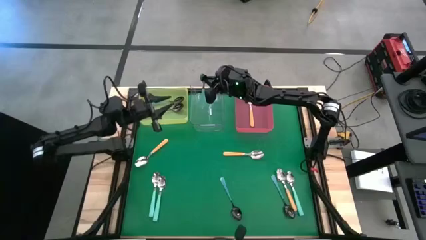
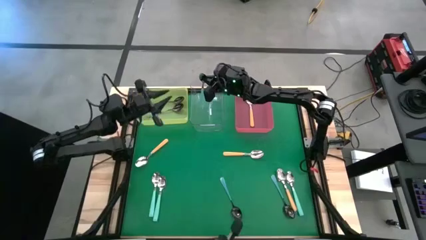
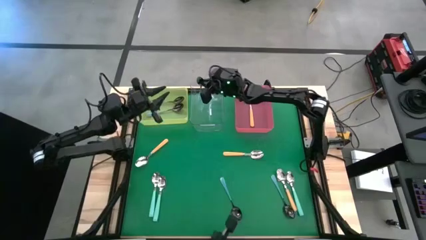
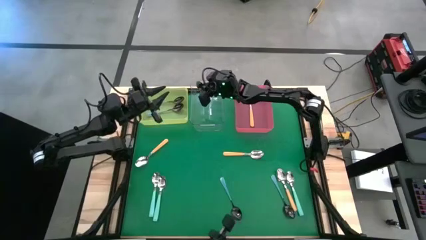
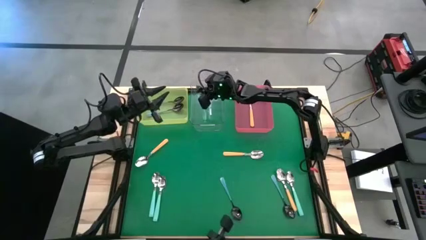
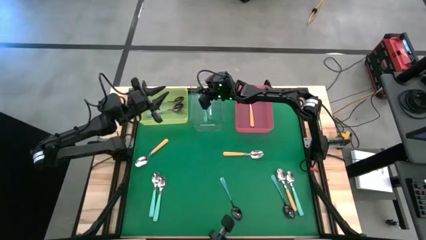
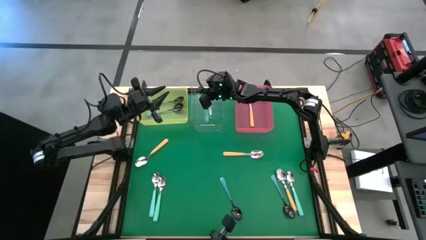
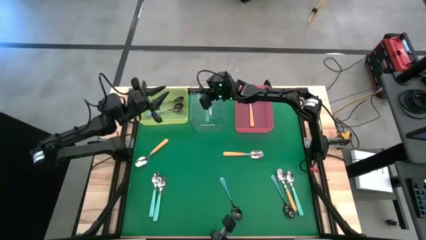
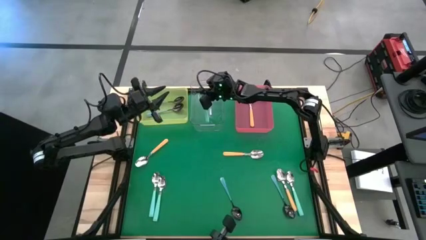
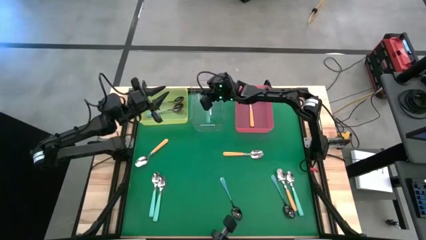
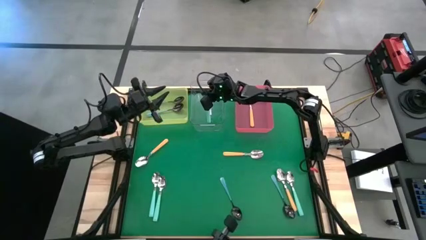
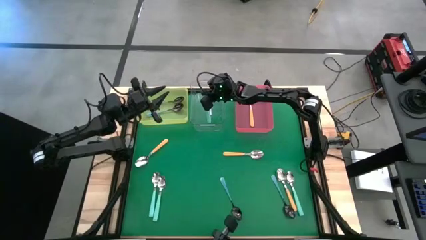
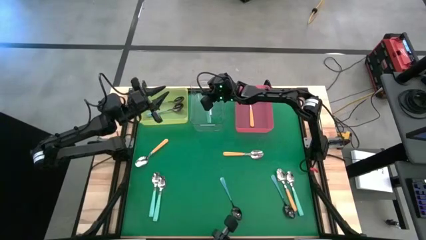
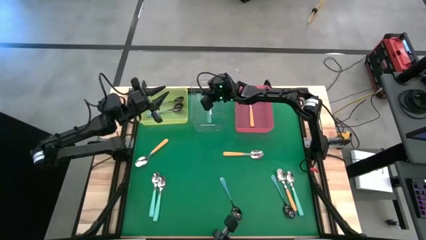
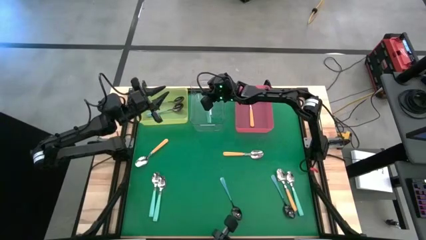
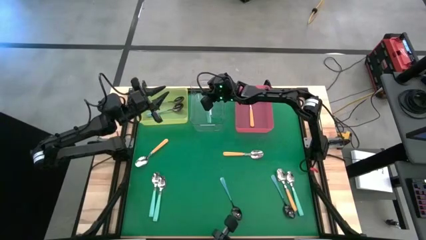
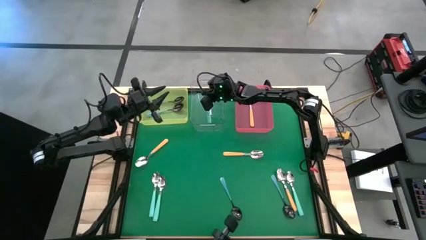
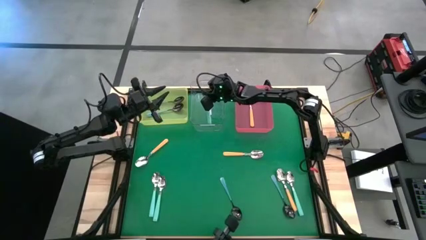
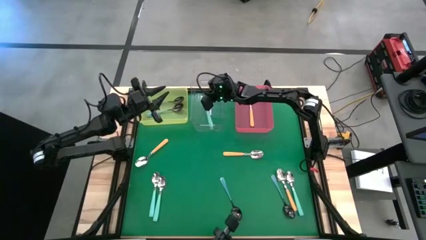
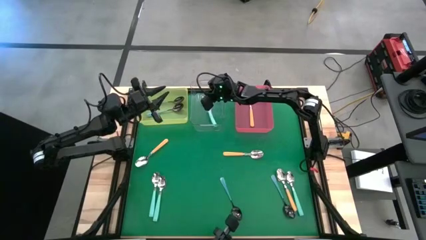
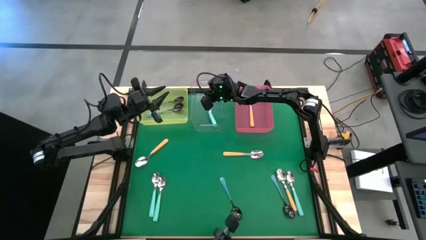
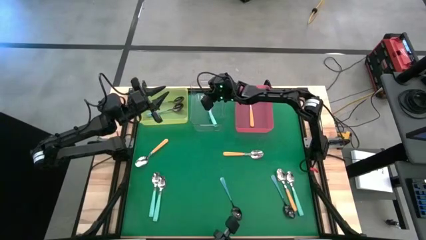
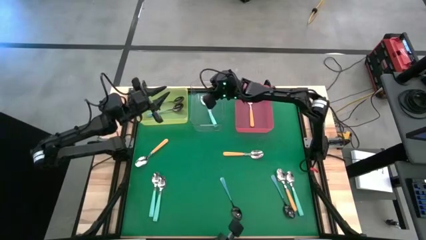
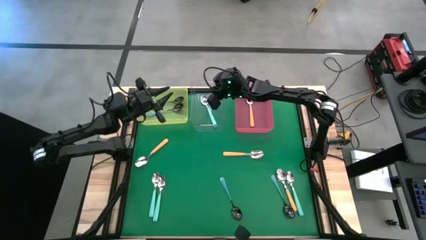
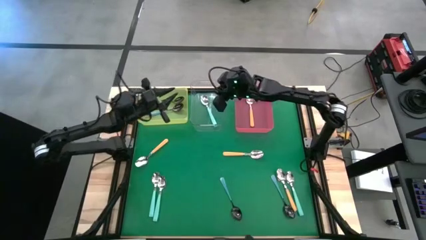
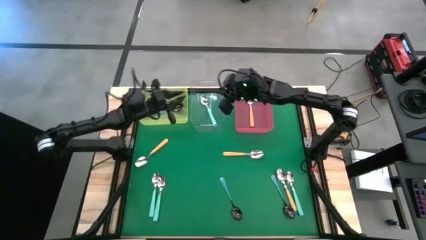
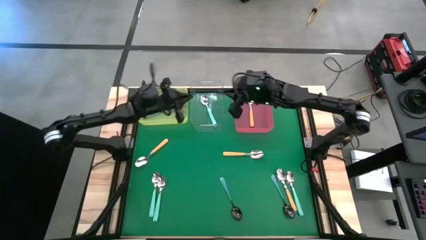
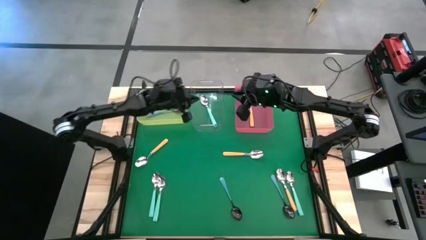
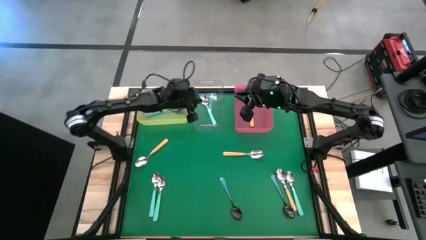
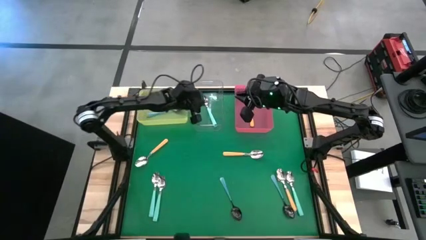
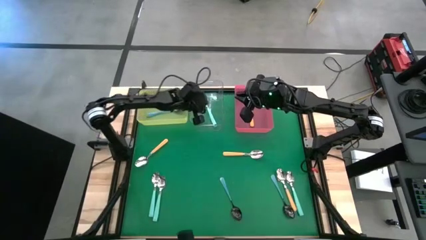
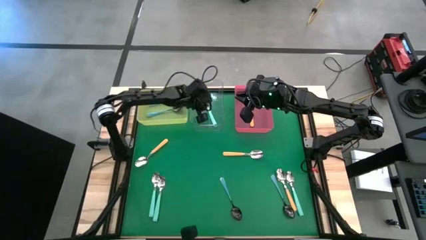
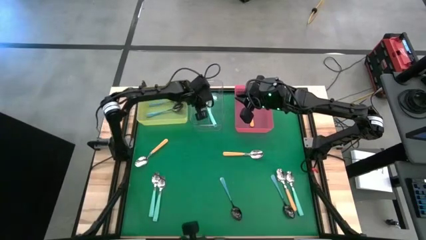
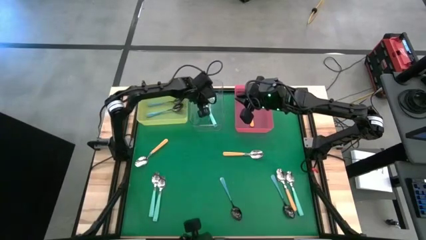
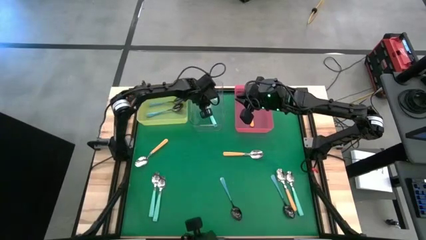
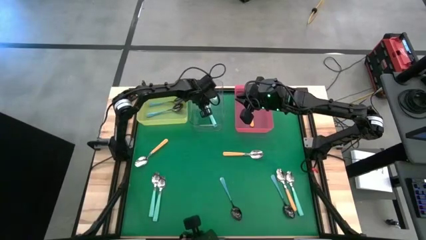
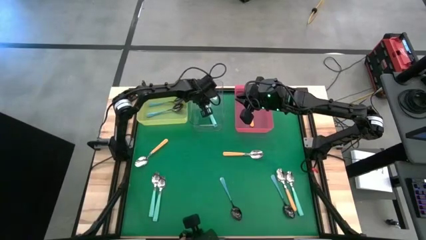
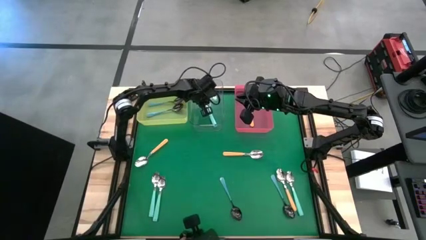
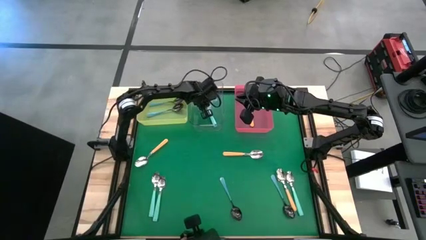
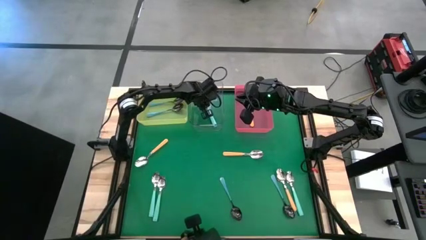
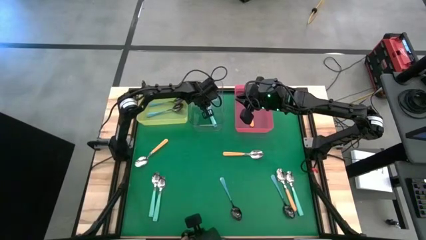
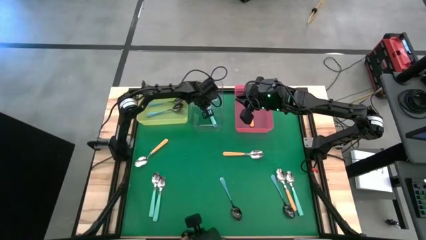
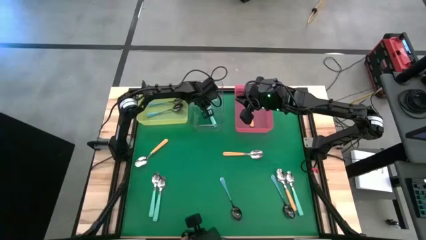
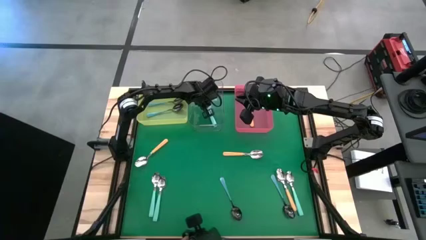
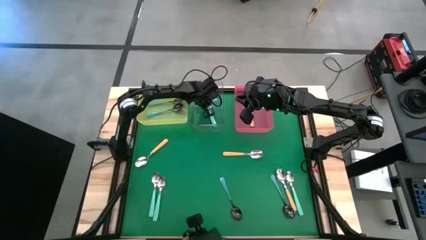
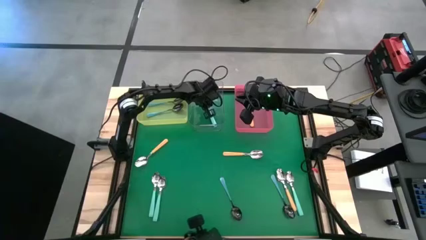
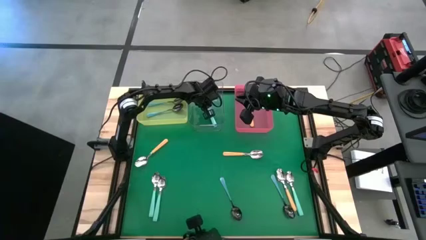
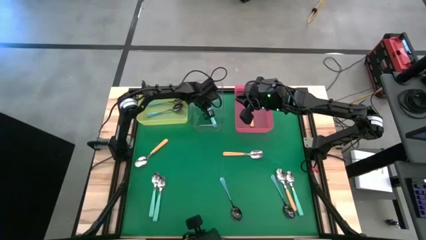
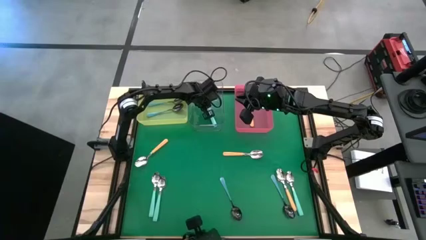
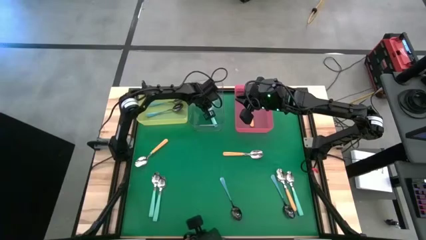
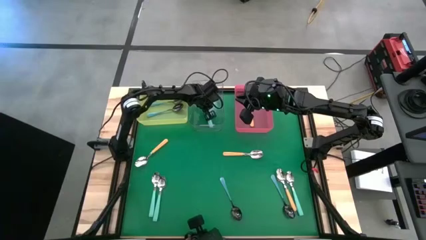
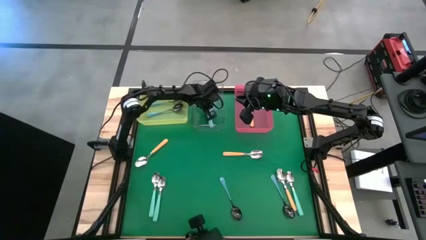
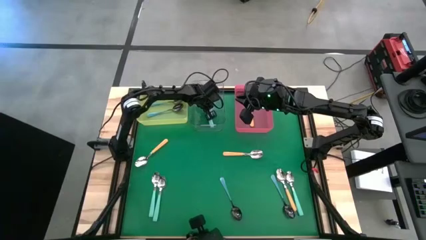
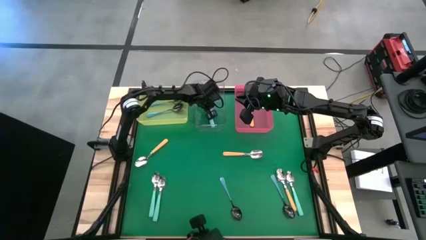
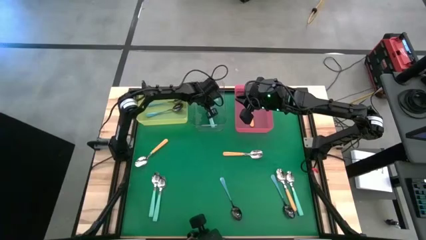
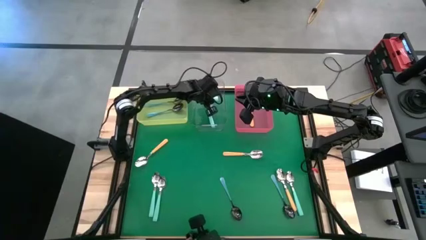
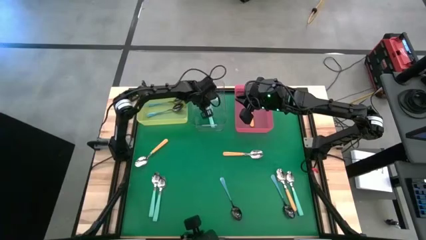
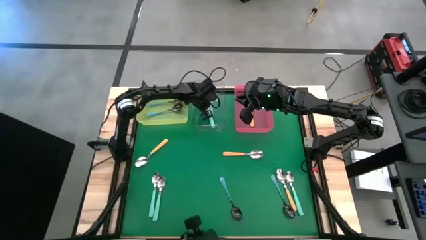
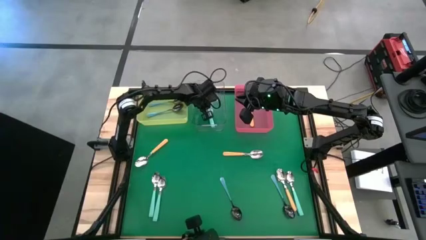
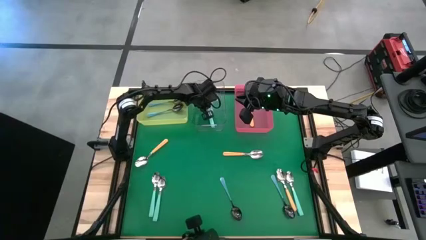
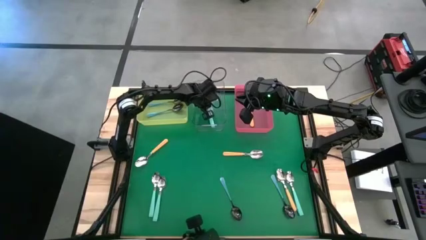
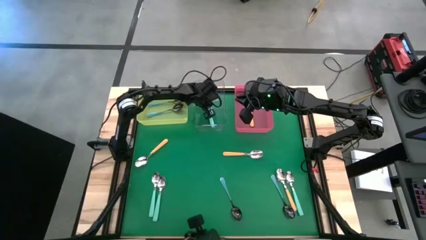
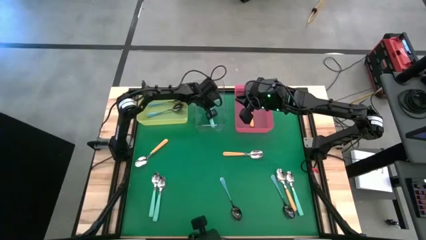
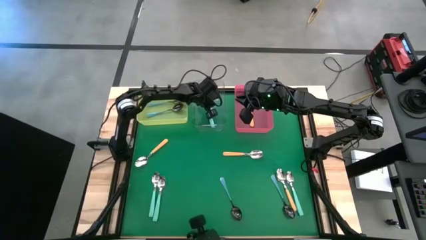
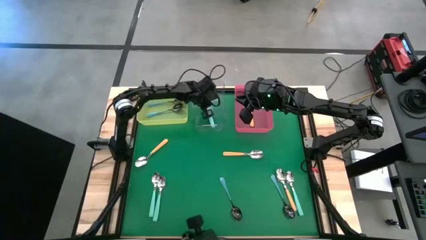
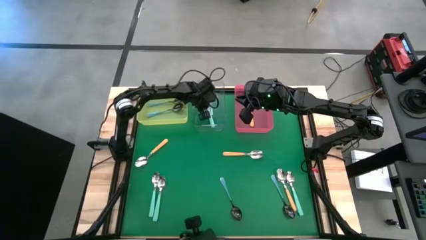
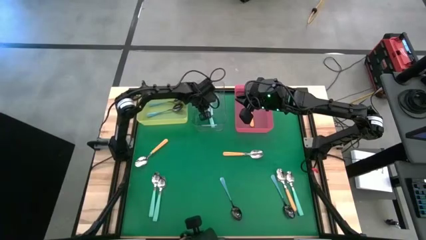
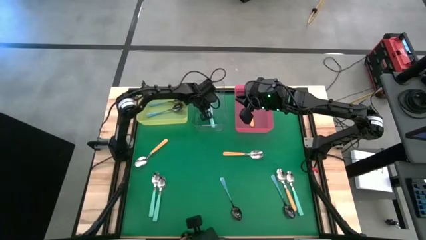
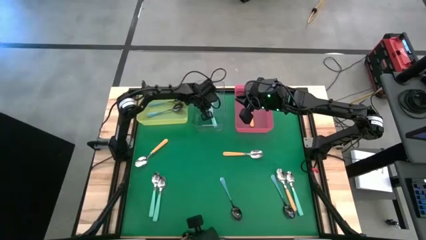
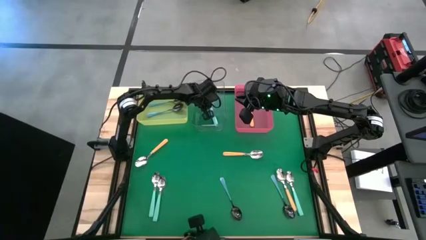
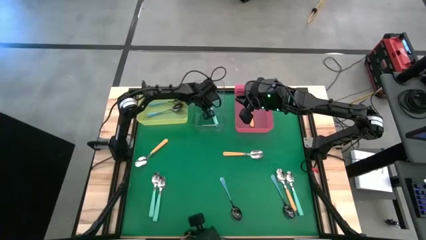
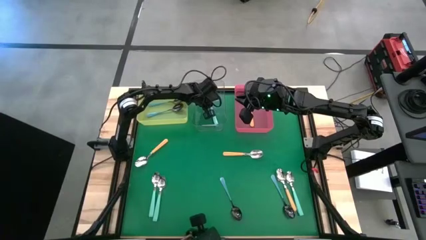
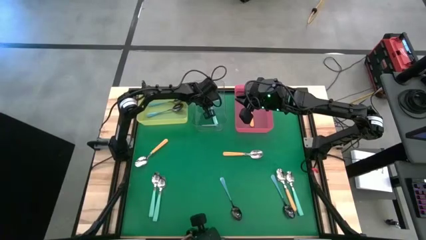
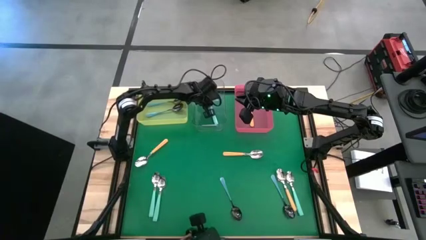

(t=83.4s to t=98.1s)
Task: Sort silverware by color (type)
Put the green spoon into the transparent bin
